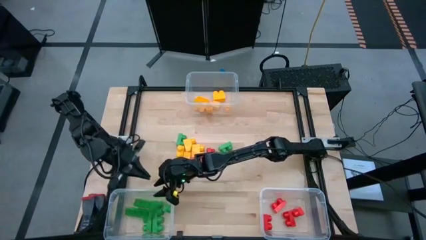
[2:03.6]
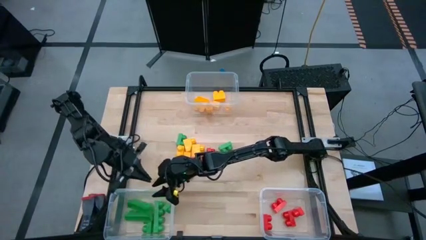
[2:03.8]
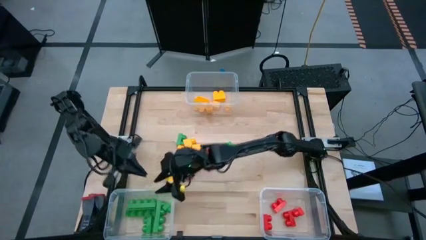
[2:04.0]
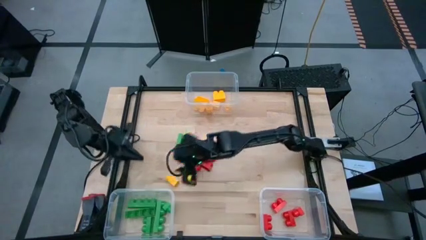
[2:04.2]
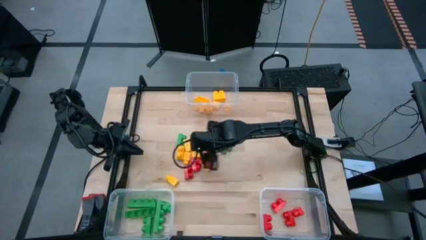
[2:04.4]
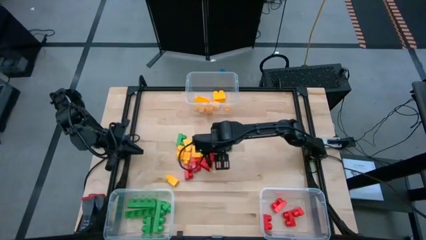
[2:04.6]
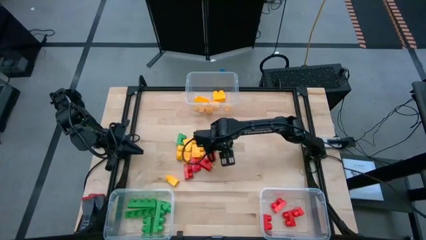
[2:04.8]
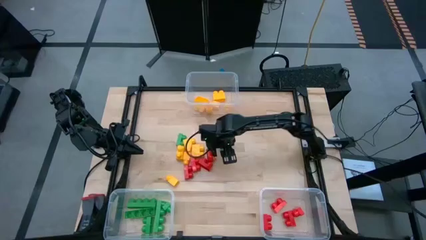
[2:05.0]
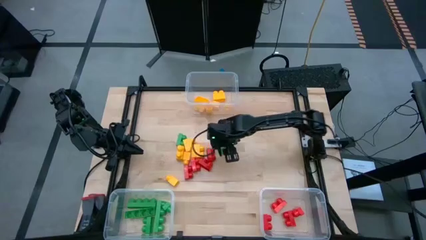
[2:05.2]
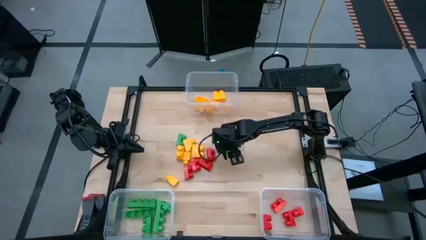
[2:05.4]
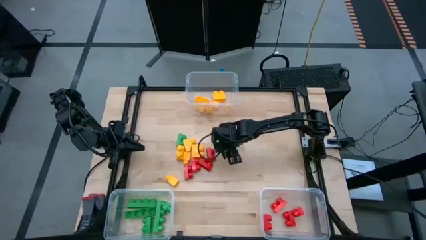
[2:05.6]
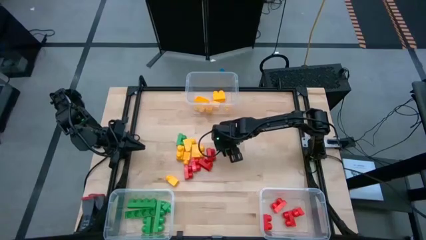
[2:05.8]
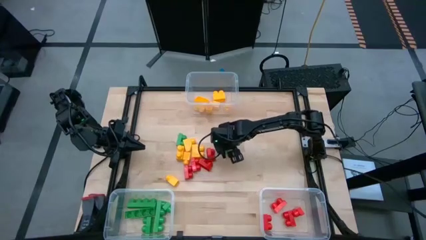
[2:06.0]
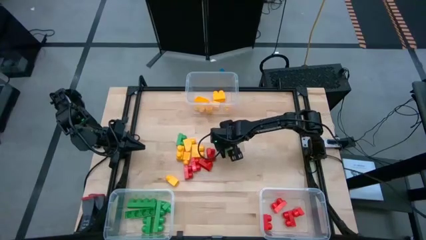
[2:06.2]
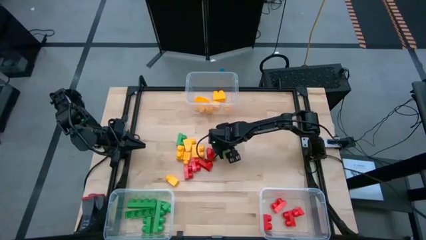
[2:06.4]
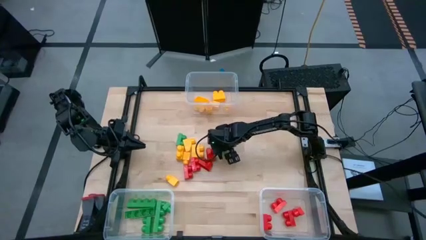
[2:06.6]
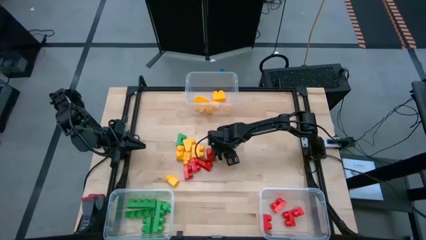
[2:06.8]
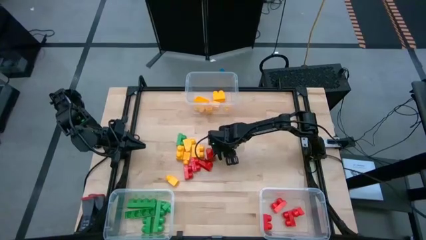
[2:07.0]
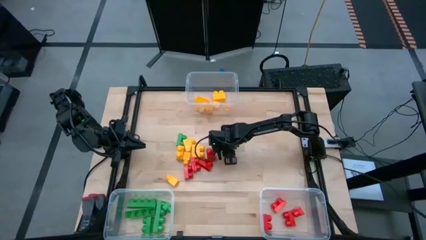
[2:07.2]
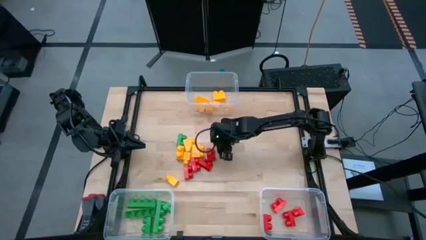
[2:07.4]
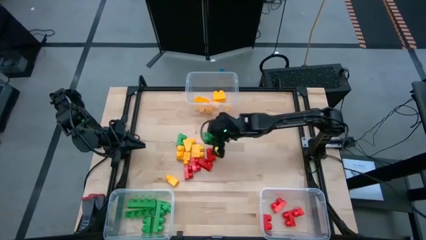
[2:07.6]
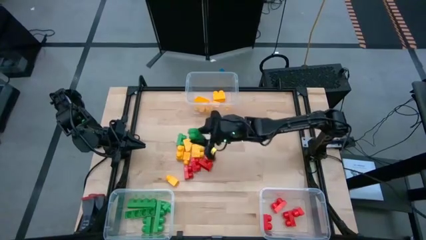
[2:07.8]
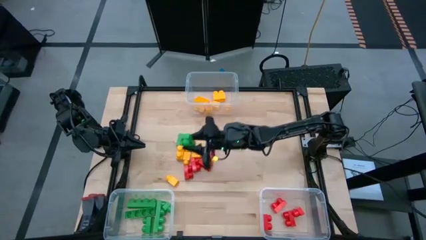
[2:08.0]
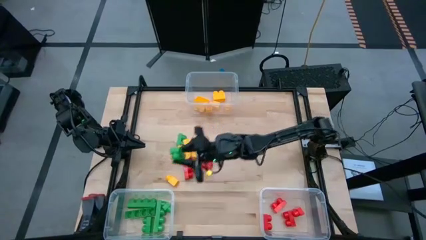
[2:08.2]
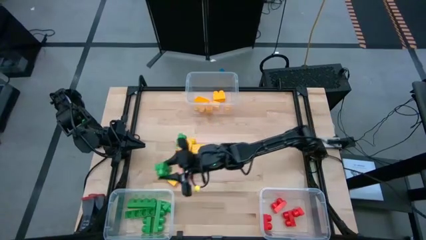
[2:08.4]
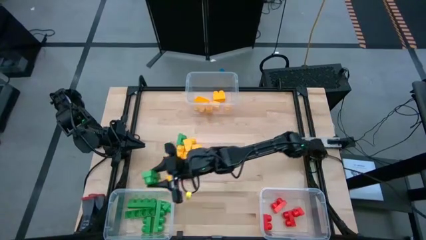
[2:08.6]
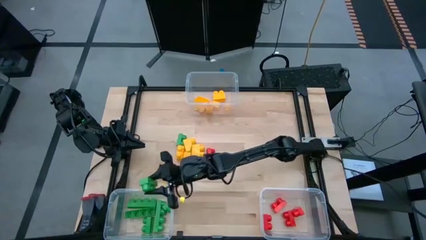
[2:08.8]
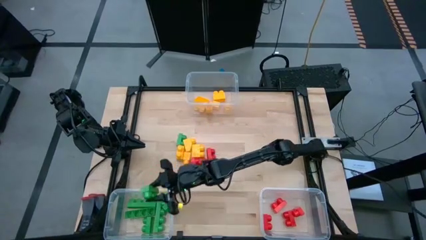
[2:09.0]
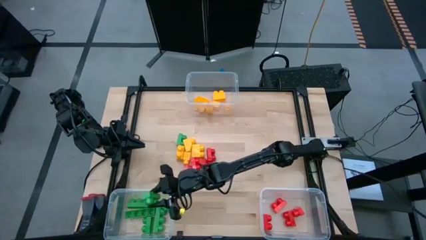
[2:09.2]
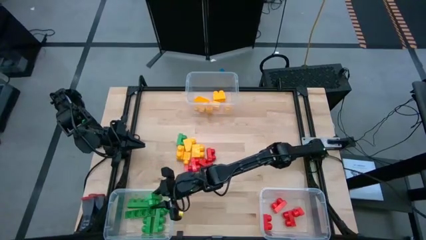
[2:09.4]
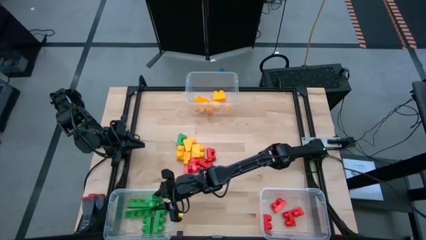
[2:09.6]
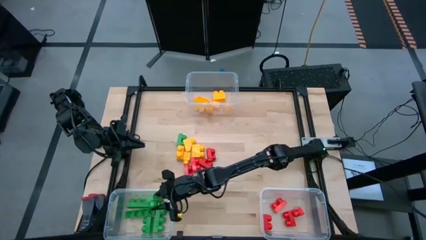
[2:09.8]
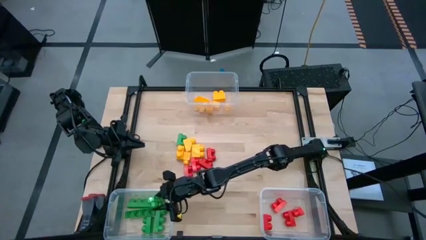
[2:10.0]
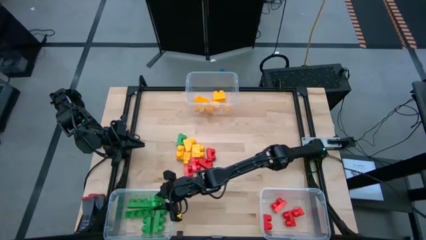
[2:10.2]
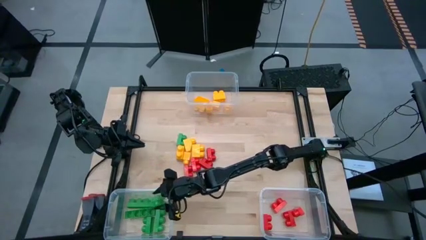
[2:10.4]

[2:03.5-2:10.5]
Task: Sort blocks
Put the green game piece into the bottom left transparent bin

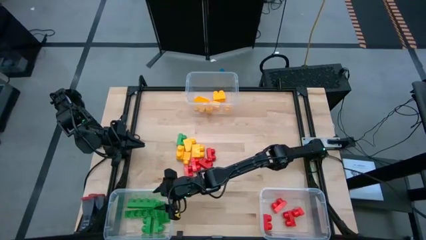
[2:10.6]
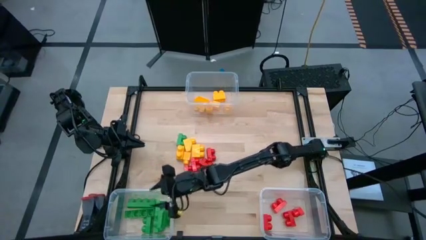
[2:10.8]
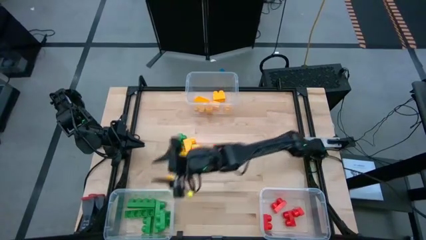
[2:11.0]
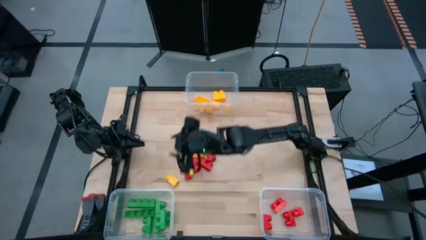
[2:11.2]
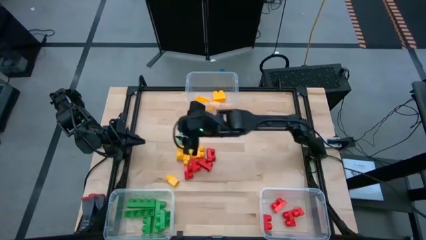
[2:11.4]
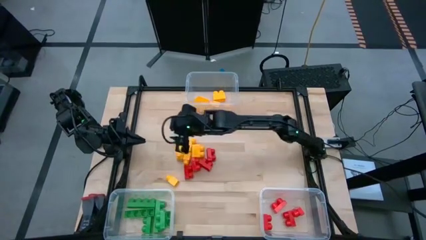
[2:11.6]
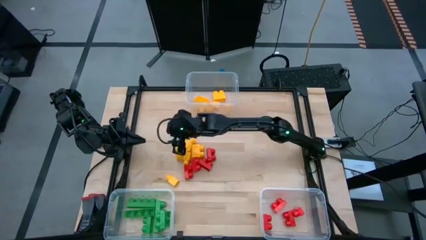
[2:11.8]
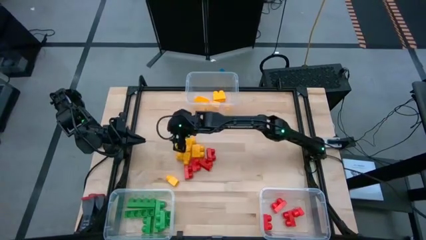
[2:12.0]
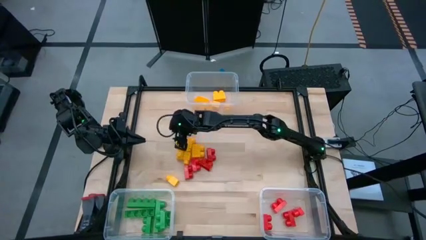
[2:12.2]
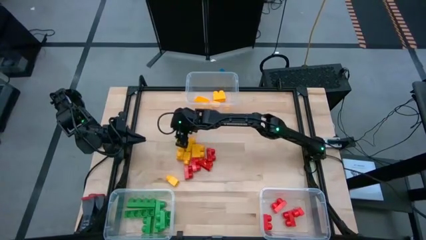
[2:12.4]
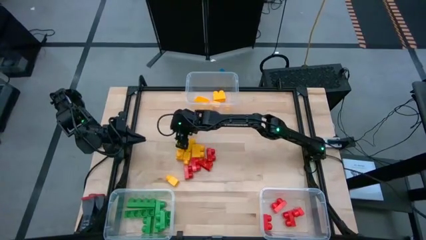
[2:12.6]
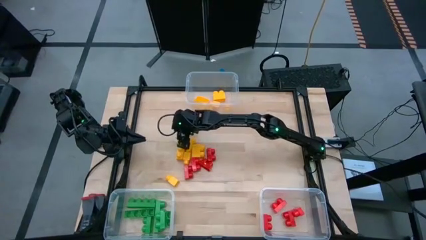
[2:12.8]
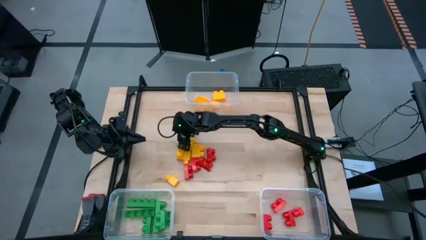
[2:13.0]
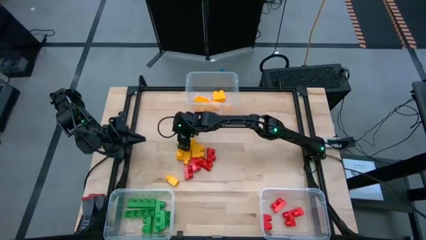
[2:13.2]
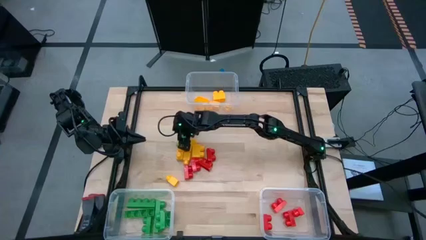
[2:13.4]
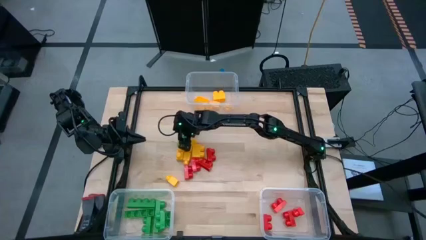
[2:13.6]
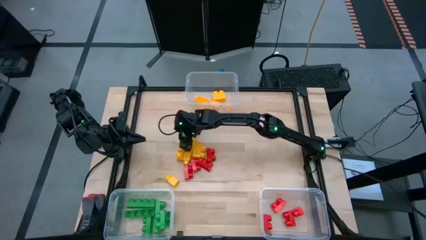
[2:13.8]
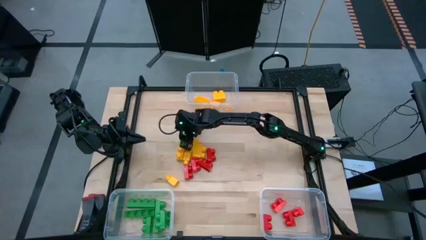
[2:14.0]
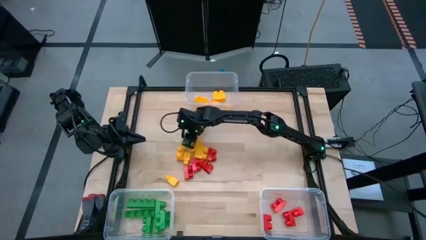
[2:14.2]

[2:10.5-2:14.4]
Put the green game piece into the bottom left transparent bin

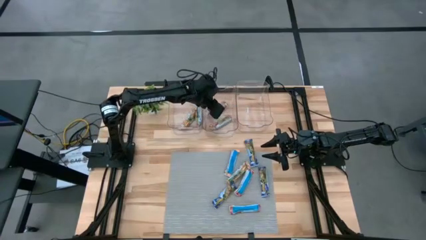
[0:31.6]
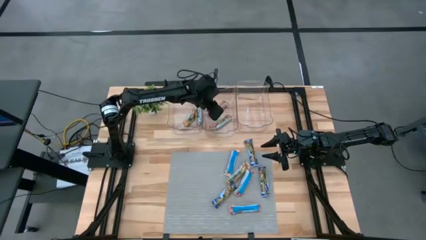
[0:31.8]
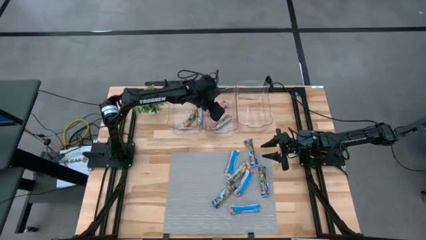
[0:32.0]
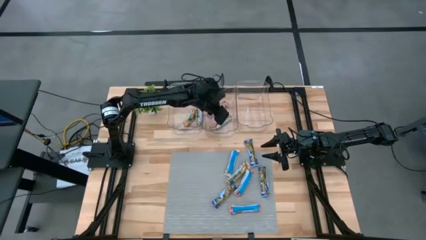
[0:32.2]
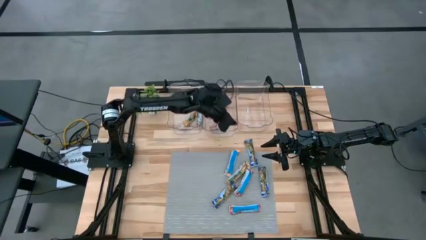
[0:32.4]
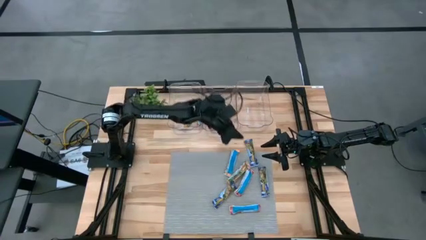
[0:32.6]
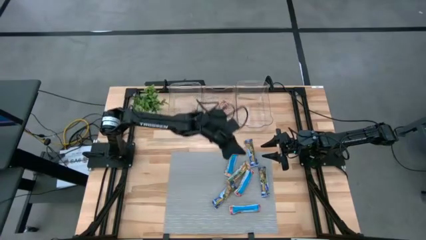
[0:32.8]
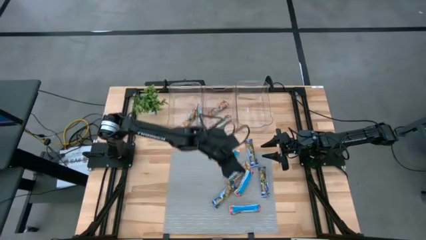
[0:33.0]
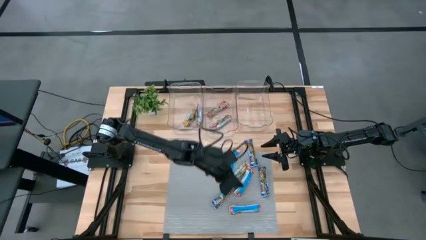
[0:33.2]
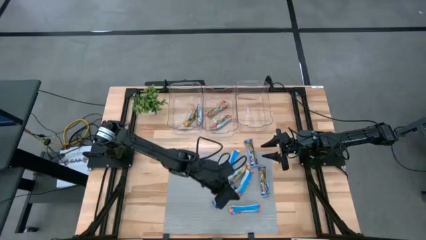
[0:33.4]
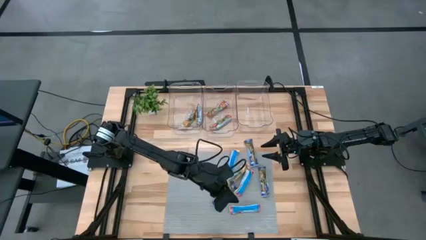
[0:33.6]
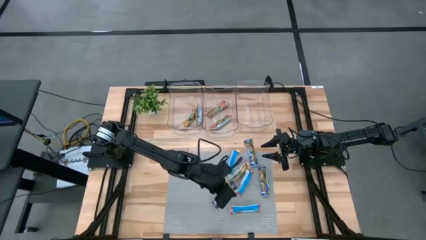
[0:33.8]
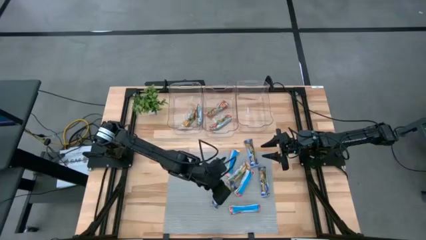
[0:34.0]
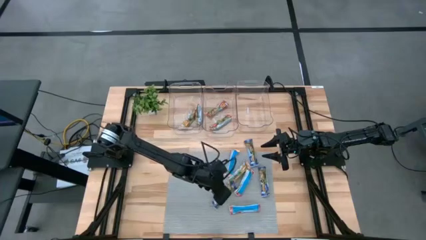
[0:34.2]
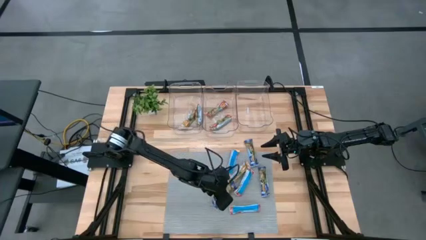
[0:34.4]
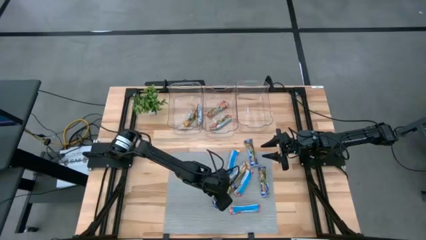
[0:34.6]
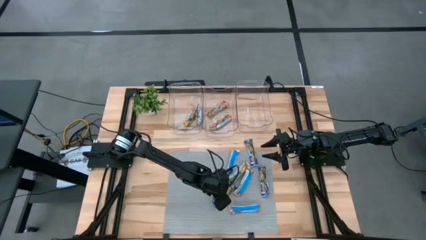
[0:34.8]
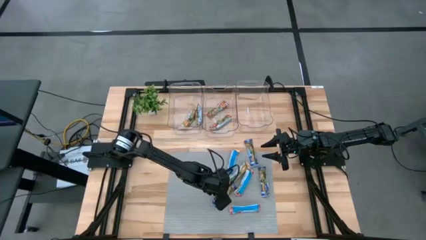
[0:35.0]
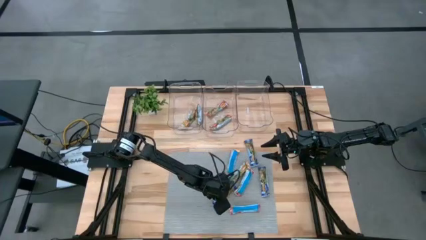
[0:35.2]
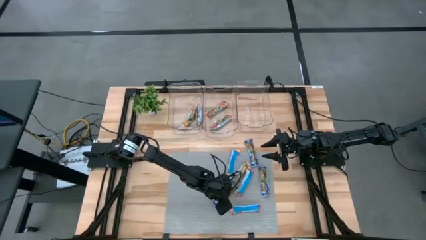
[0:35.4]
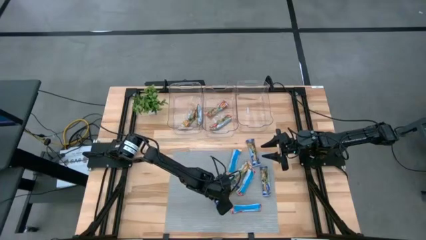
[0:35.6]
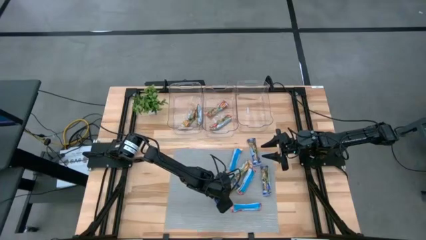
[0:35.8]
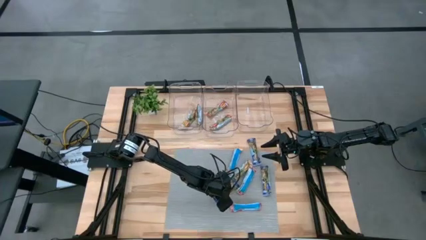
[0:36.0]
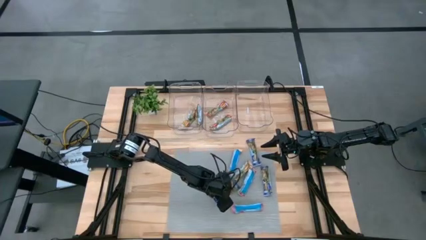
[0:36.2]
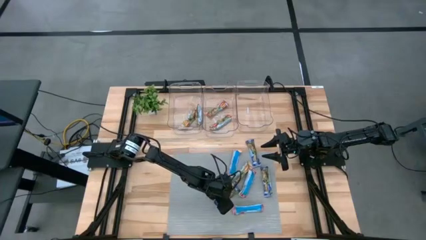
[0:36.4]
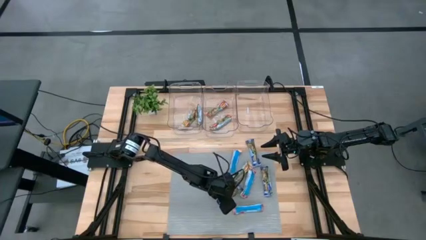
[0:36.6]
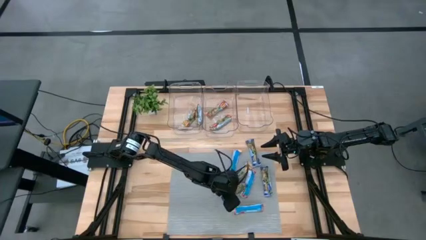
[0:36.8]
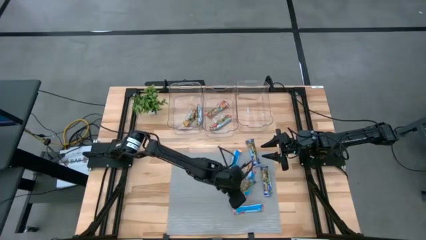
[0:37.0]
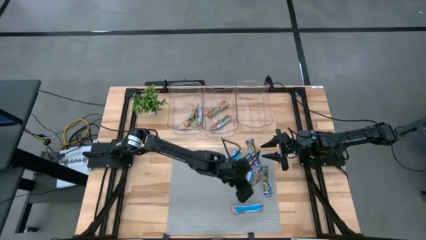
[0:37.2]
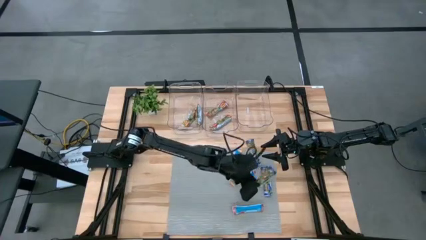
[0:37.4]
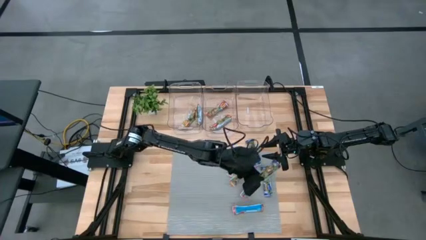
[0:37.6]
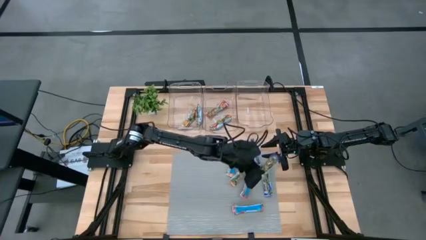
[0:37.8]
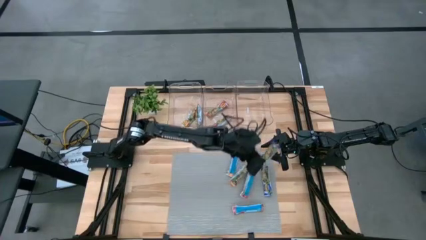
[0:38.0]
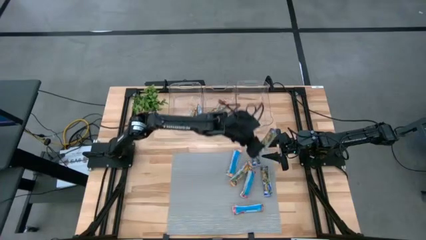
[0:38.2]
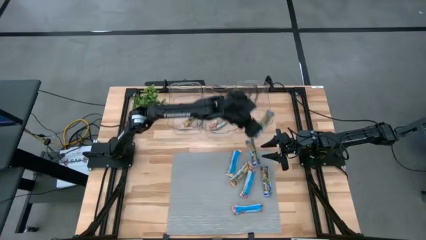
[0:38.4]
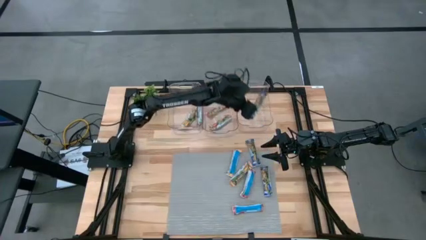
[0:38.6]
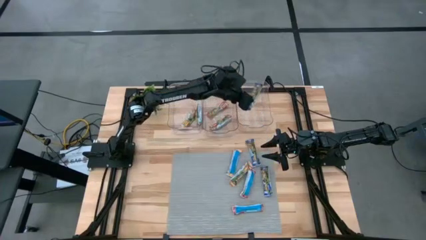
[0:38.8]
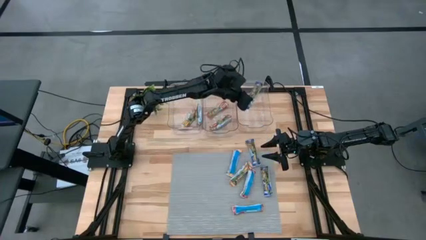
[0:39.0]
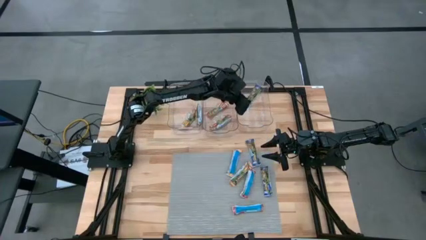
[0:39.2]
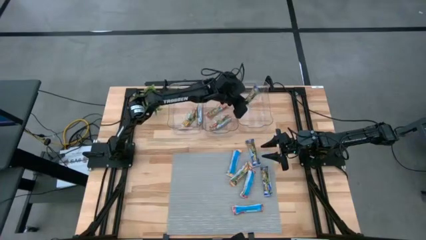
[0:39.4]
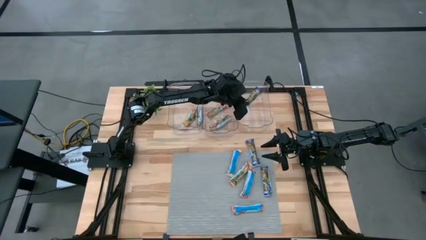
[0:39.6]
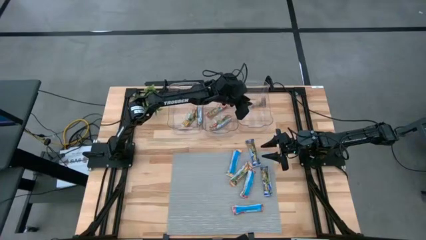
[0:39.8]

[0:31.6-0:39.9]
Task: Pick and place Granola Bars by type
Put the blue granola bar into the right transparent bin
